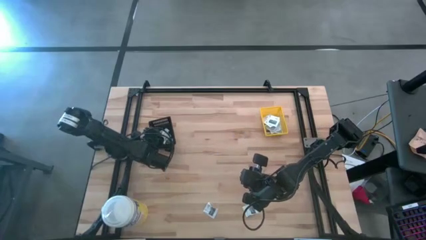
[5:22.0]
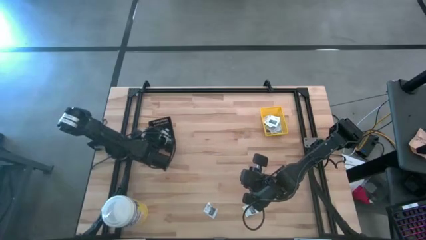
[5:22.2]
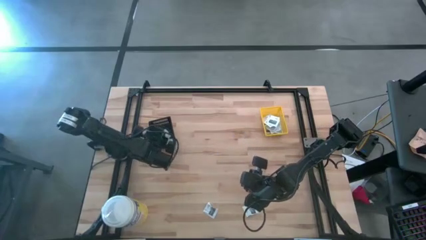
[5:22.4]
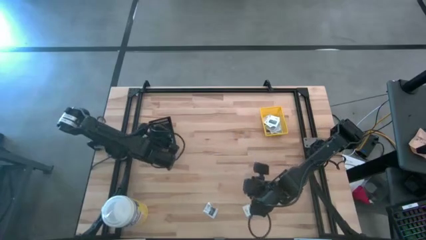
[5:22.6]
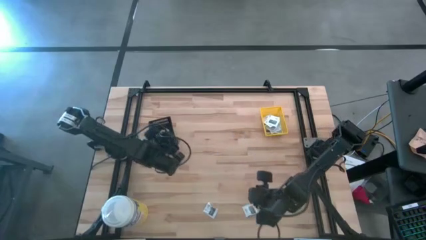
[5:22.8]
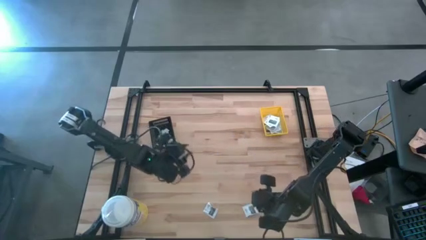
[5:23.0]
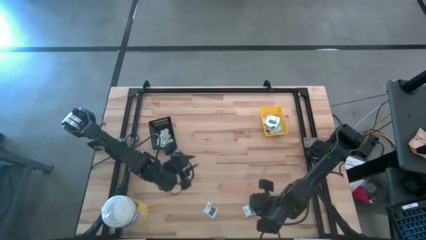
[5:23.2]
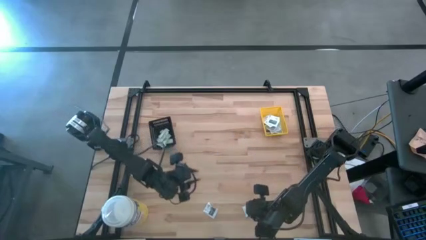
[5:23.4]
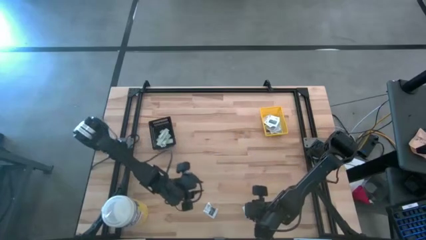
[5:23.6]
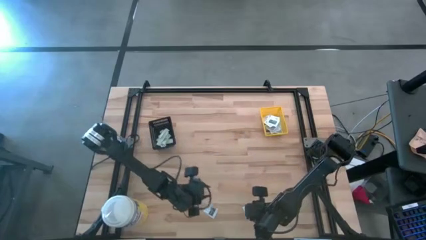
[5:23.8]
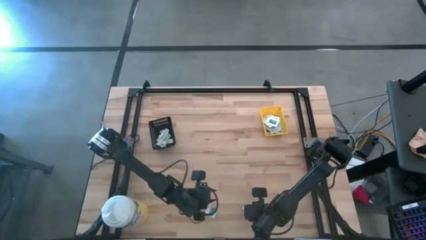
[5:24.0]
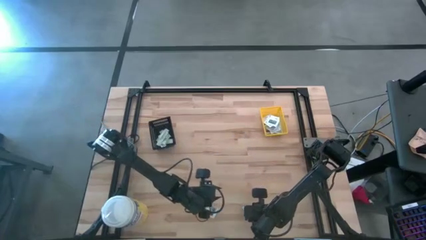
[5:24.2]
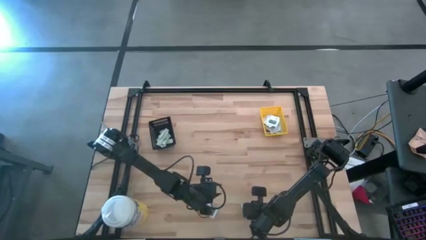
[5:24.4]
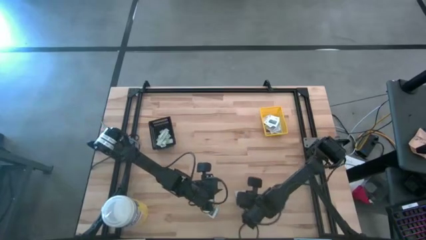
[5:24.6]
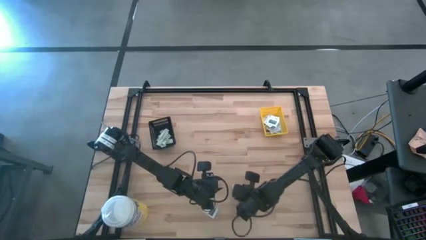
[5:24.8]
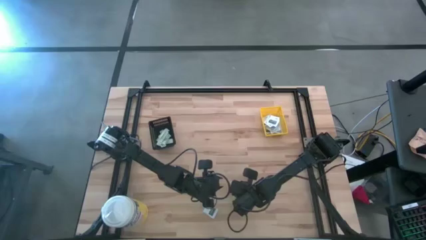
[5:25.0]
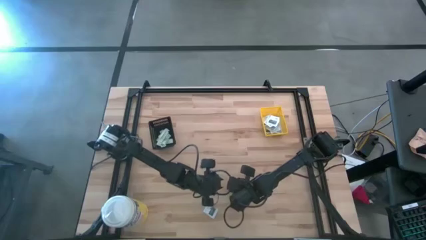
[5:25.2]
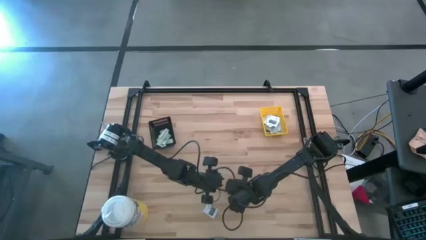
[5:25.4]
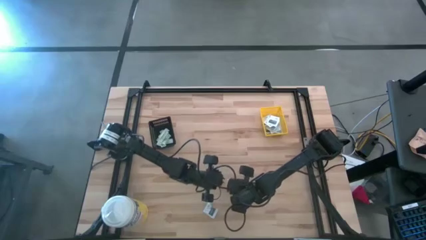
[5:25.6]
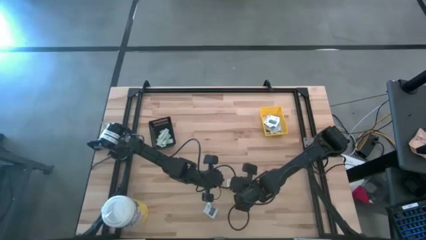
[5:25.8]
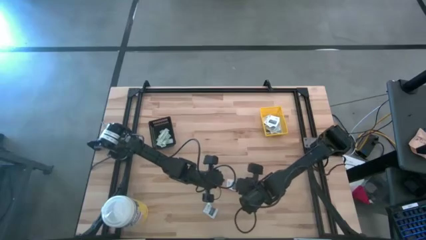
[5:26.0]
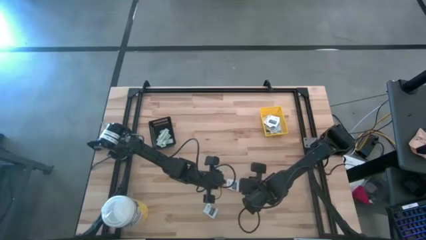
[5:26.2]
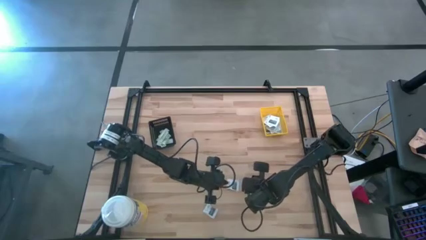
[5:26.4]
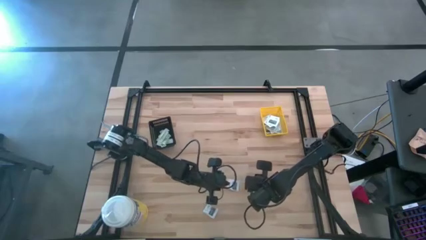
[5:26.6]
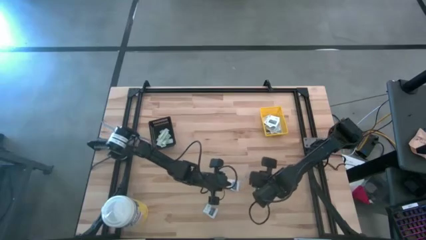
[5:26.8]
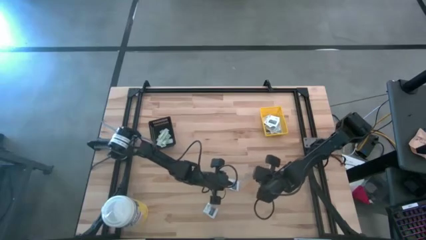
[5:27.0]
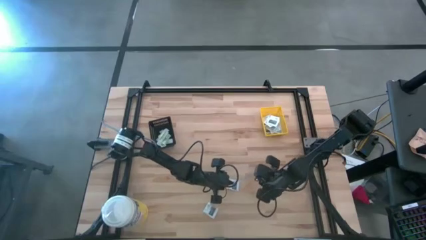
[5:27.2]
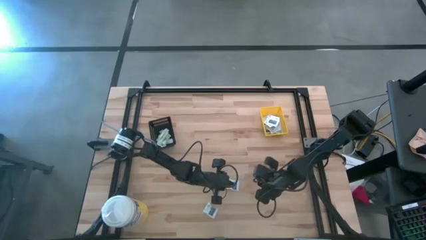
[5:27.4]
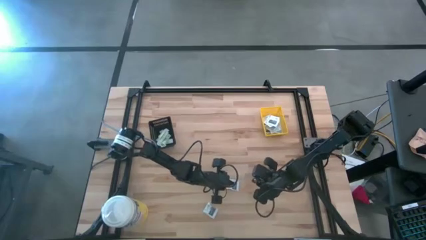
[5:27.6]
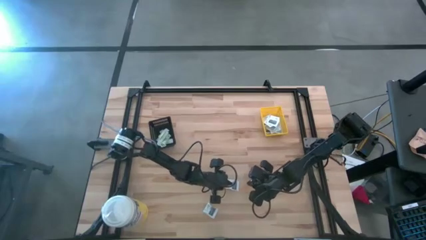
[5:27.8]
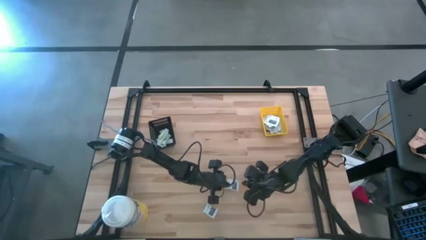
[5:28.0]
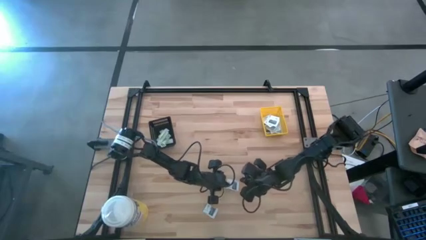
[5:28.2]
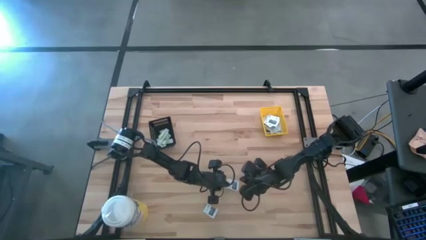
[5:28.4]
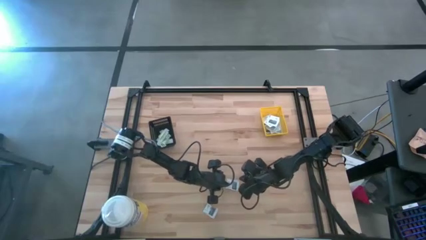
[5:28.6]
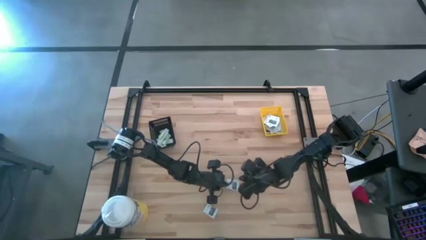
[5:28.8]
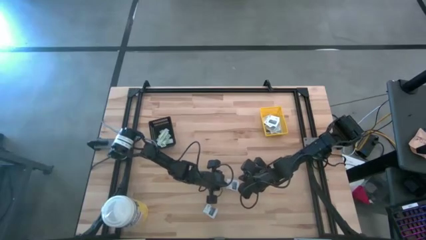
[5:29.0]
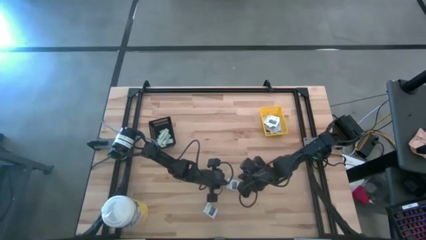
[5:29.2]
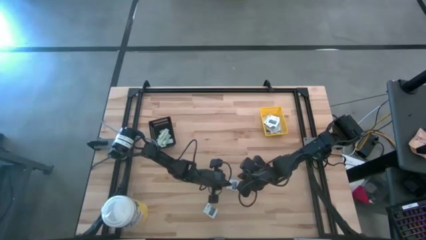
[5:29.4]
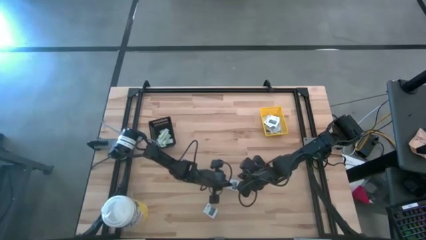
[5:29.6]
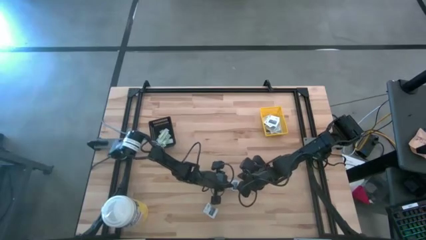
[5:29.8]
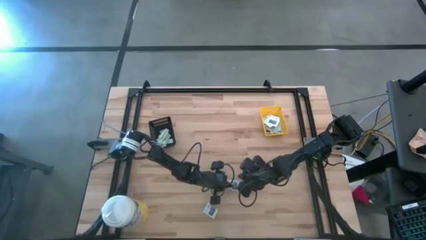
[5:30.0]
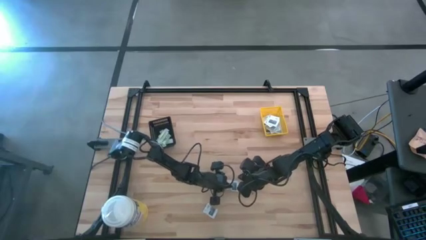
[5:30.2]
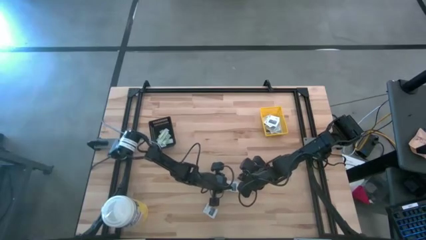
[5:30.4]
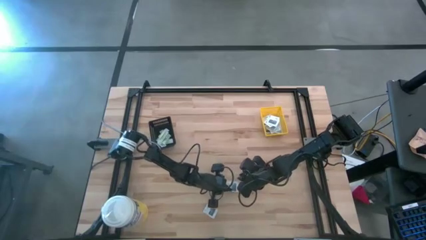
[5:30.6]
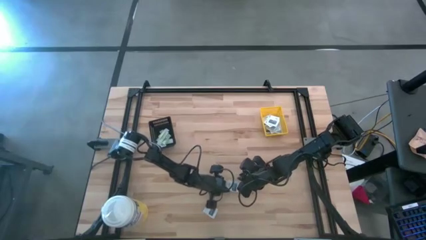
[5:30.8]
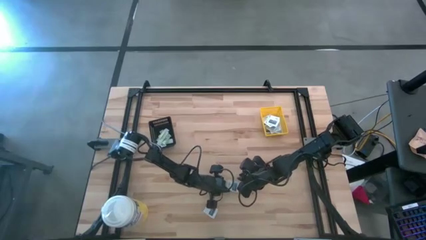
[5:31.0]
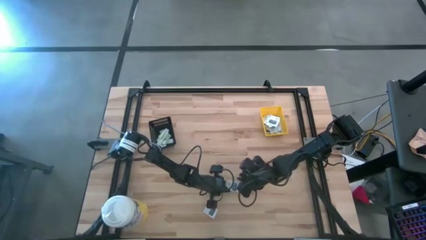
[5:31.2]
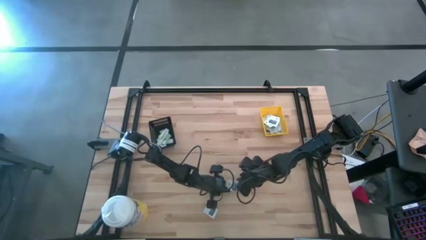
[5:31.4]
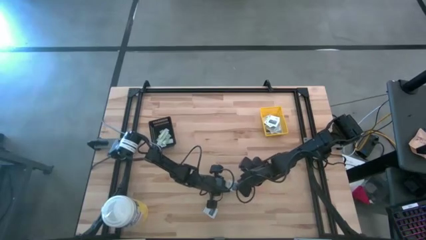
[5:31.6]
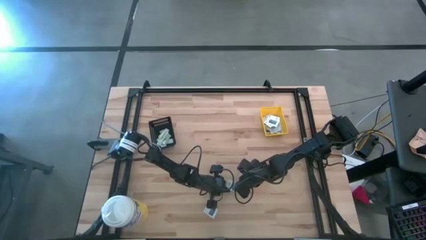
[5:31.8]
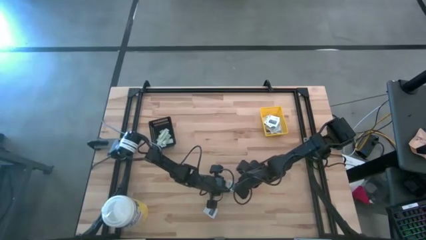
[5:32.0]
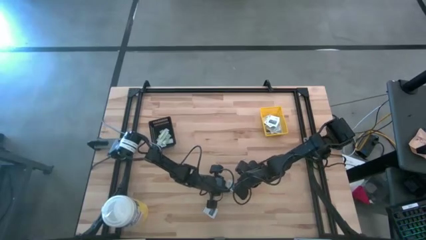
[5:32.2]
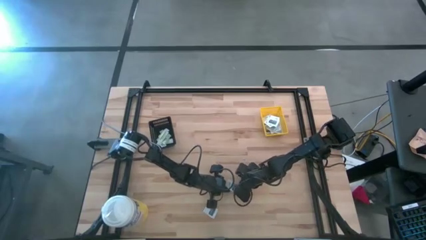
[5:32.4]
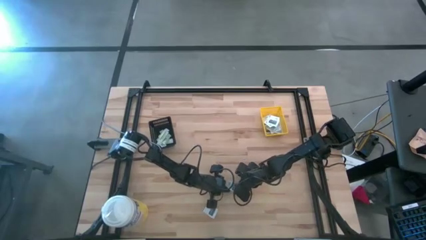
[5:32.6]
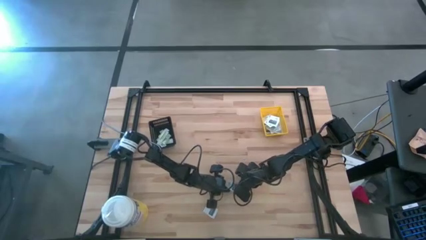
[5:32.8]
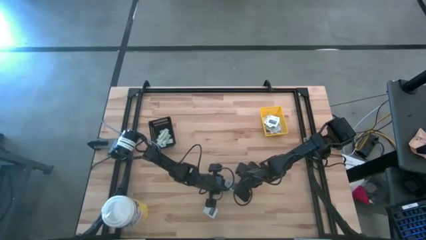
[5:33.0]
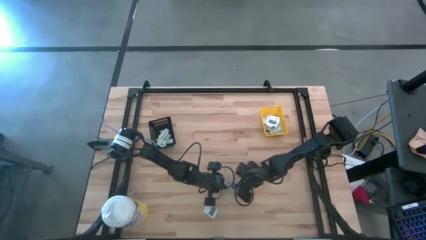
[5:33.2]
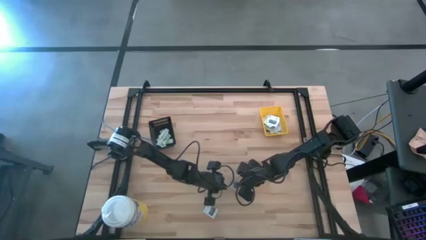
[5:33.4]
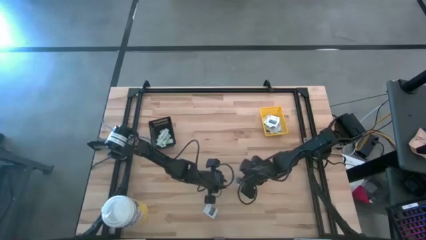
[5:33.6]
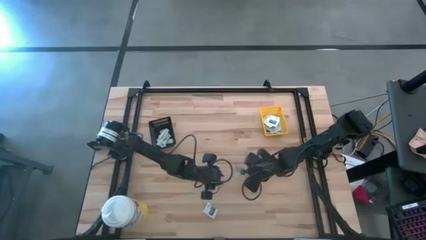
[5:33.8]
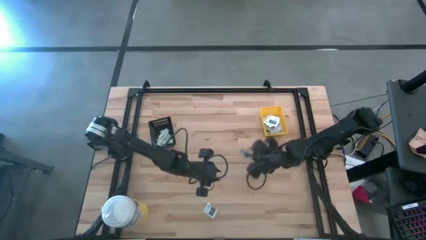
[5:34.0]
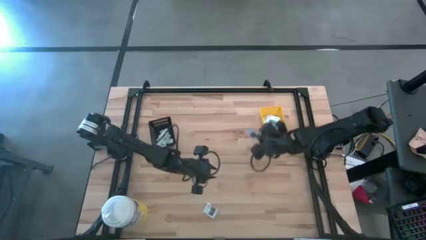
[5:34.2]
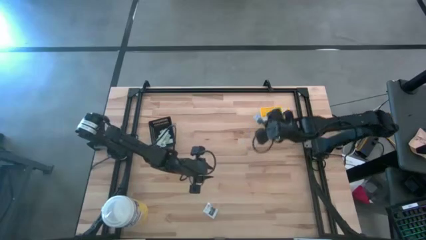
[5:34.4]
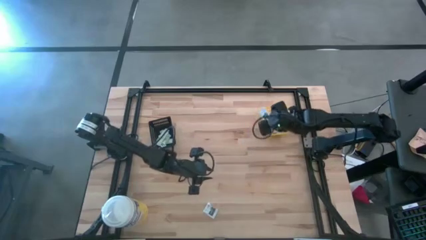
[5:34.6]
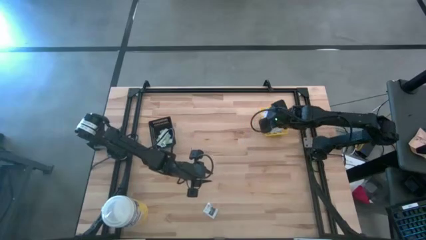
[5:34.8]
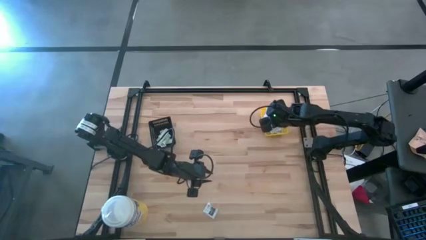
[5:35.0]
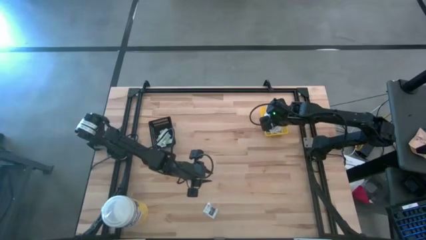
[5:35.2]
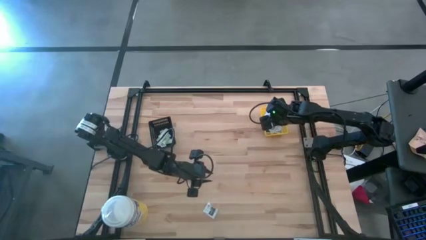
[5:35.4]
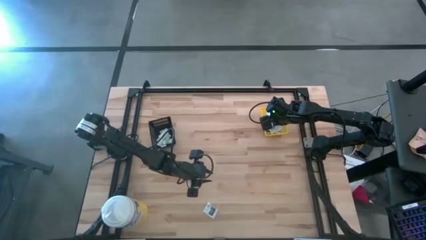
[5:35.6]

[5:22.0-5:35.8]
Task: Pick & Place First Aid Supplies
Put the black pad into the yellow bin
